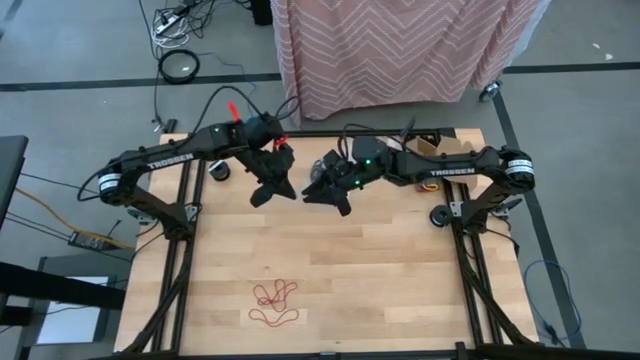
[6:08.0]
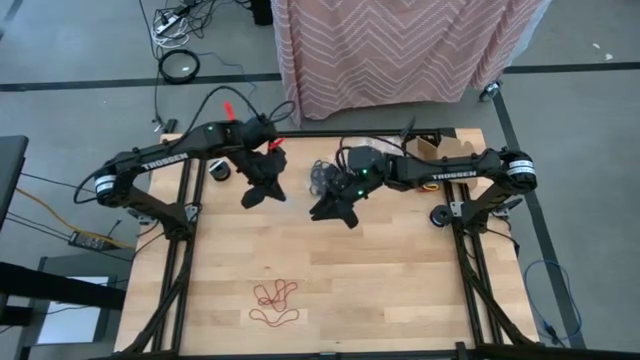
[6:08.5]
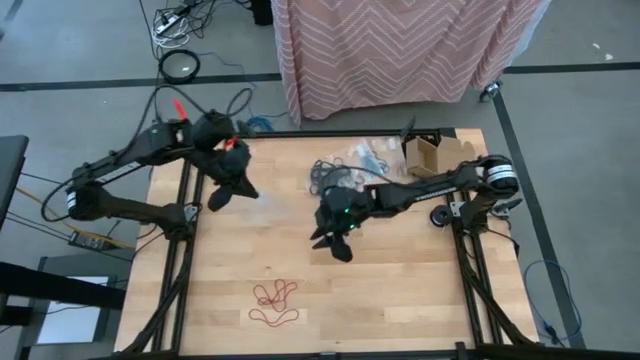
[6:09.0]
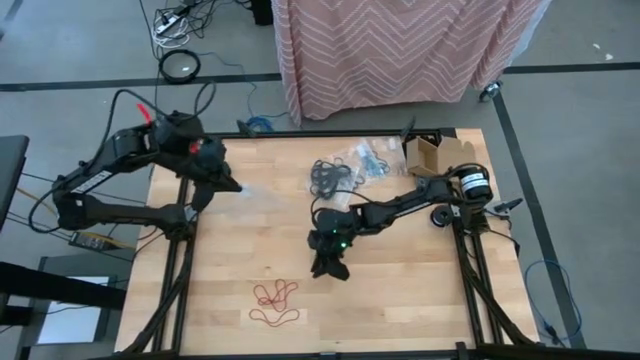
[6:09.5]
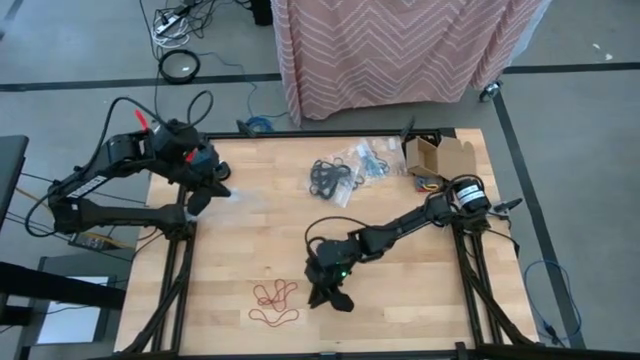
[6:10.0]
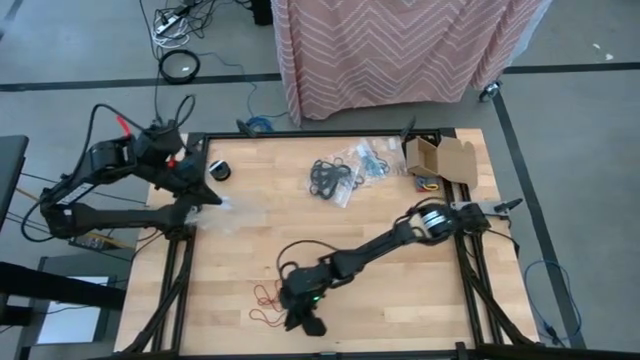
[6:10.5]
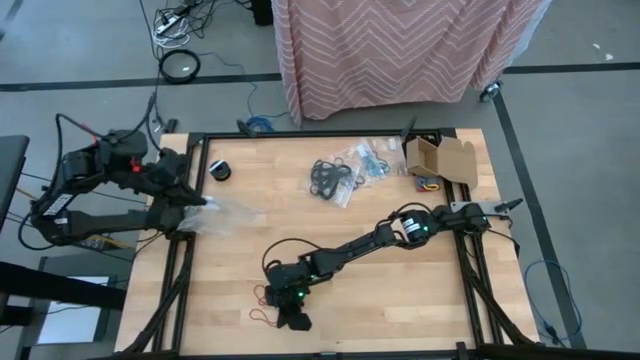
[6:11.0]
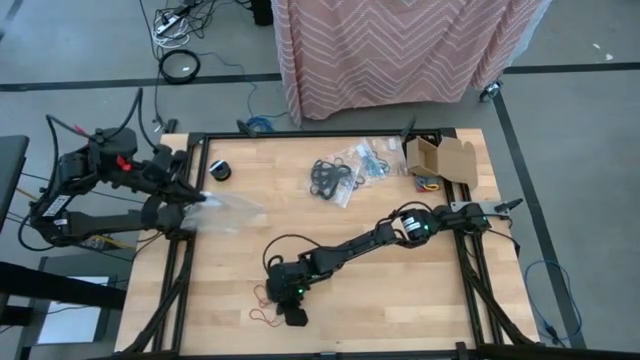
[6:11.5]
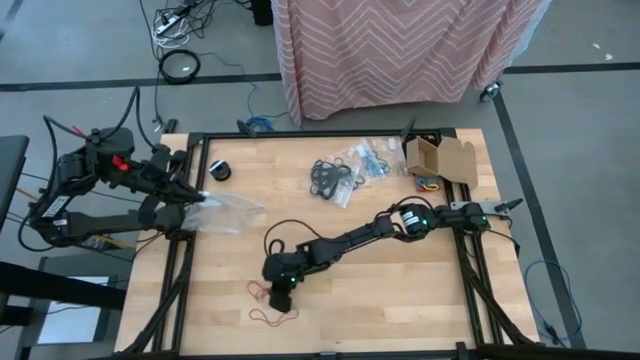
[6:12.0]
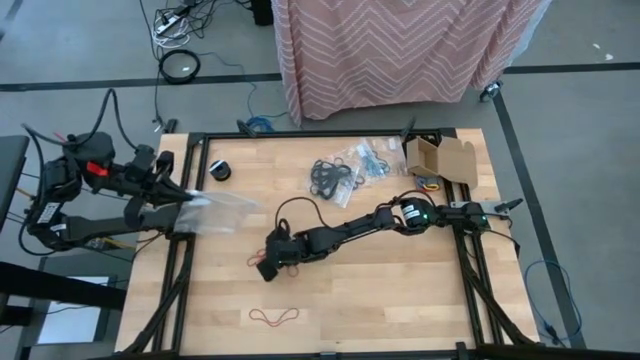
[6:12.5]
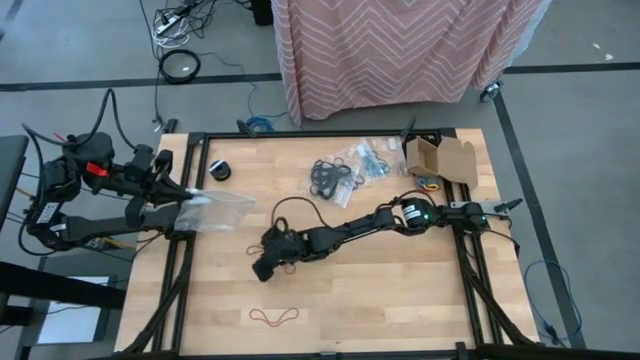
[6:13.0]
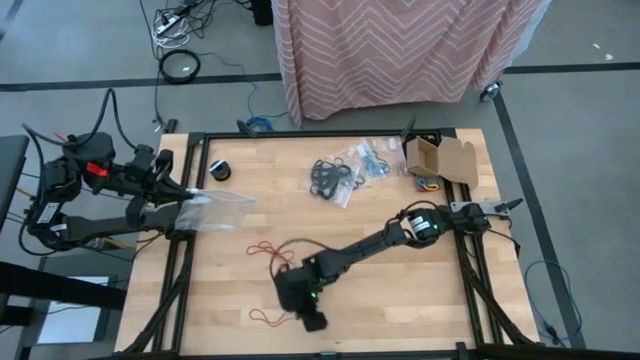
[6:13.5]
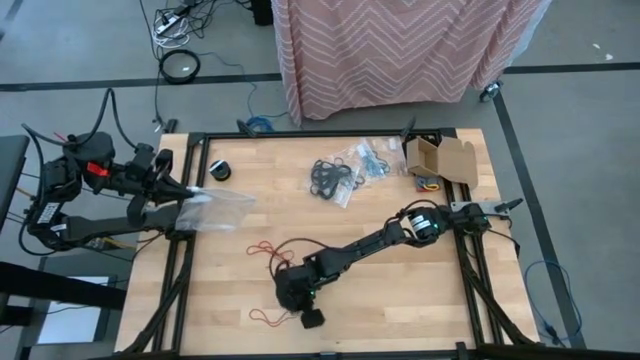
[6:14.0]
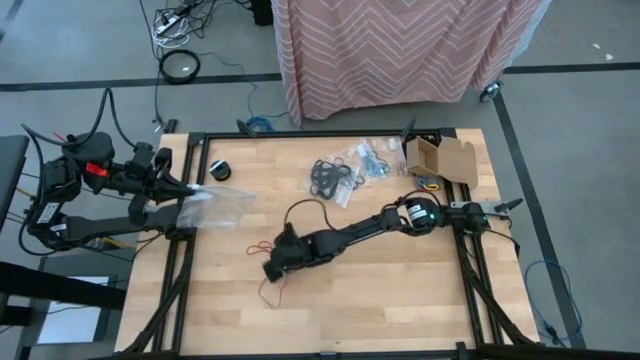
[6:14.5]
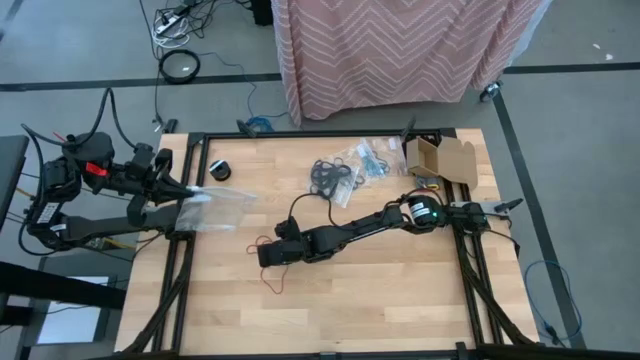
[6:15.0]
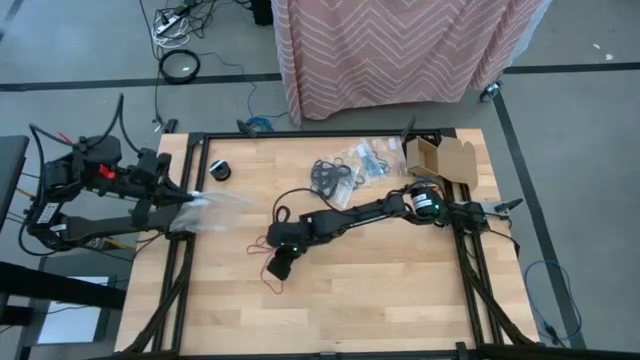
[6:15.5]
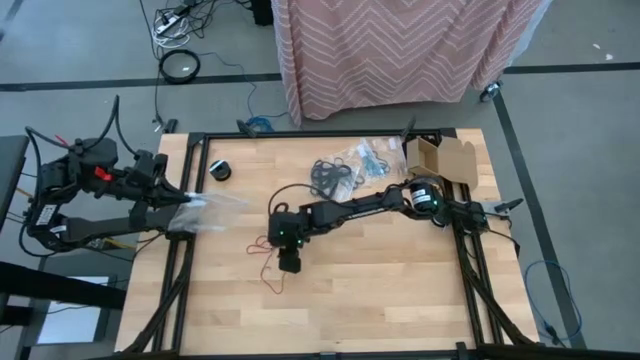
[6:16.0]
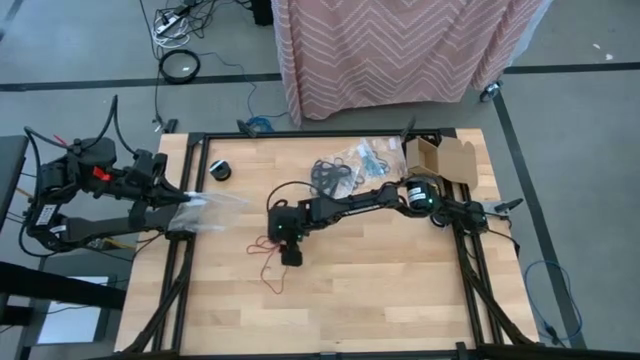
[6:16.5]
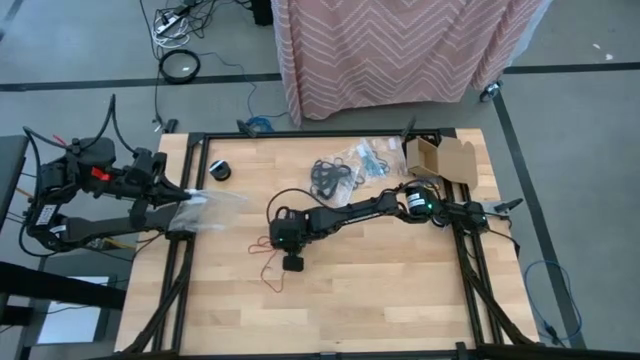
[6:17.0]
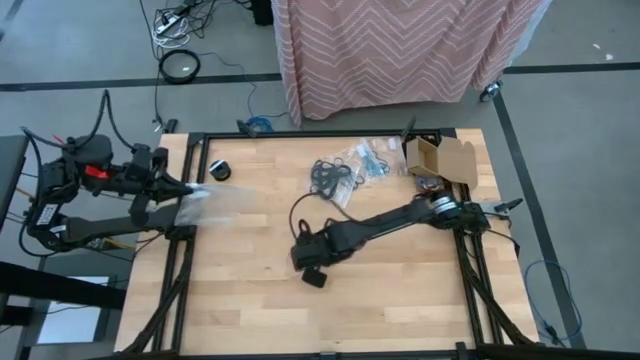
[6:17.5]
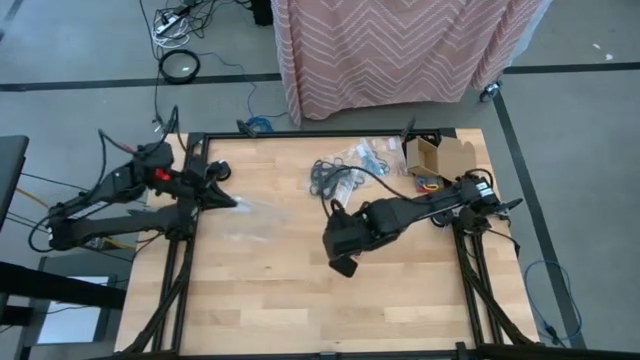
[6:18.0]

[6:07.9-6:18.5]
Task: Sort rubber bands
Prepare the red rubber bands to the center of the table

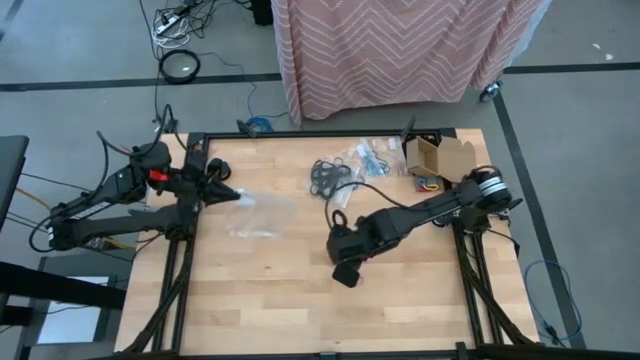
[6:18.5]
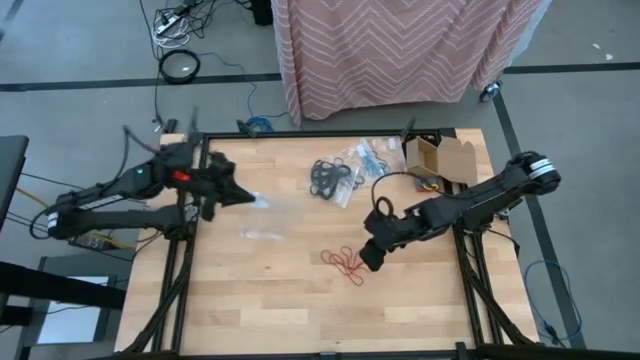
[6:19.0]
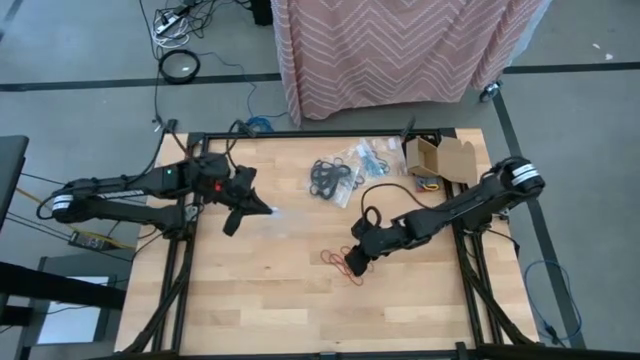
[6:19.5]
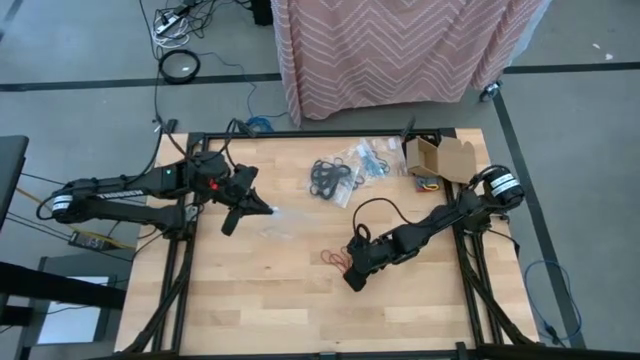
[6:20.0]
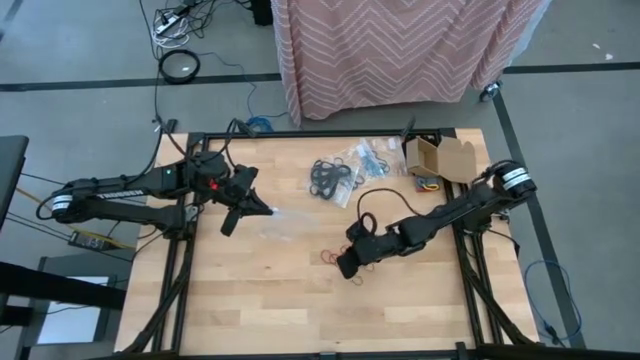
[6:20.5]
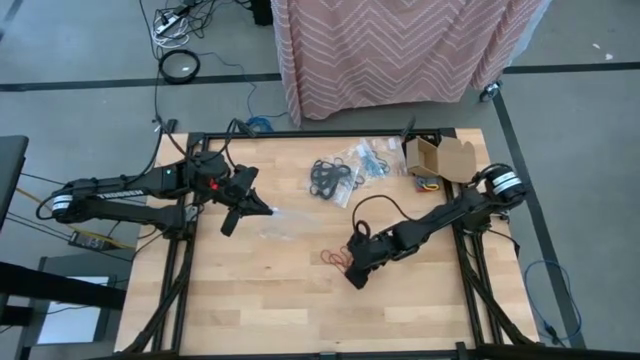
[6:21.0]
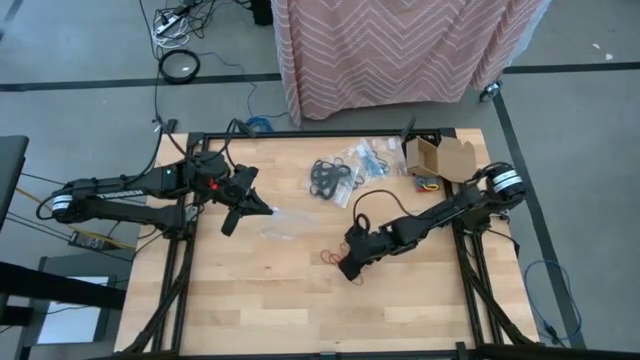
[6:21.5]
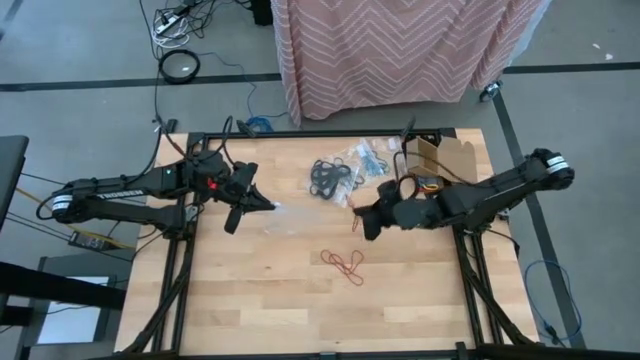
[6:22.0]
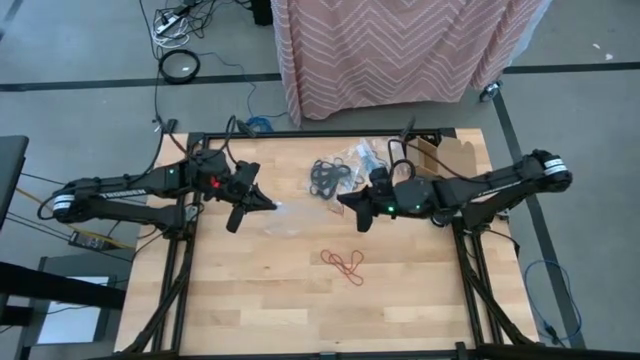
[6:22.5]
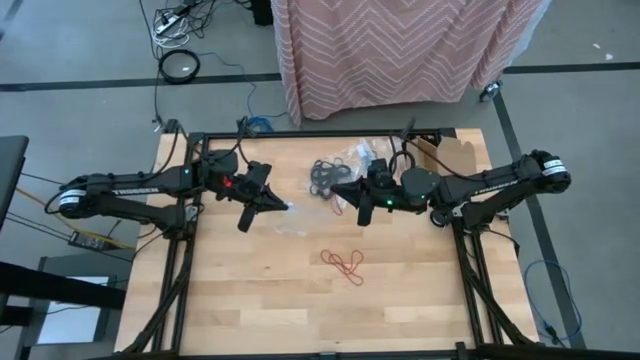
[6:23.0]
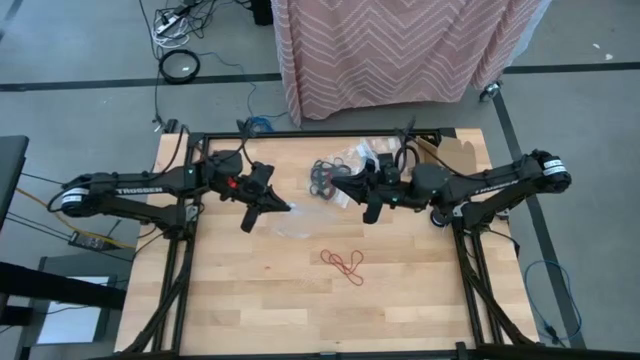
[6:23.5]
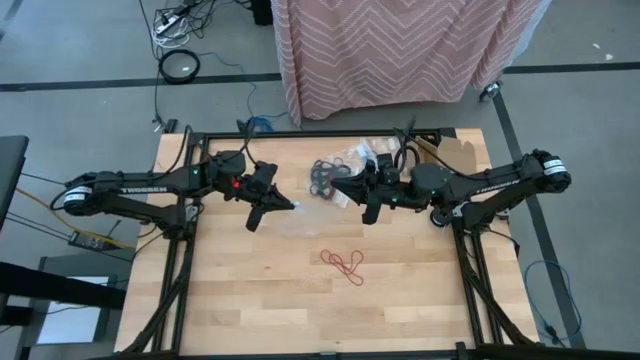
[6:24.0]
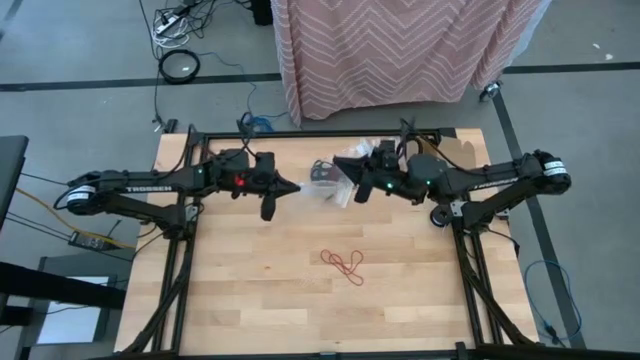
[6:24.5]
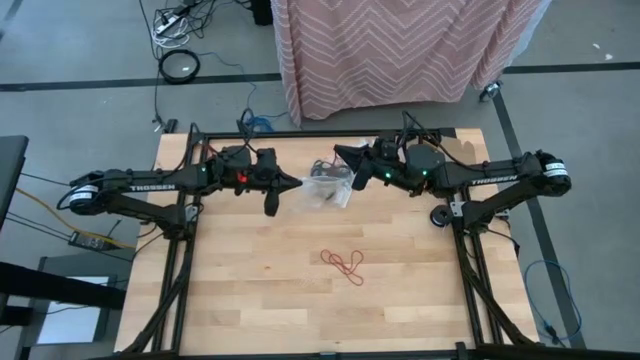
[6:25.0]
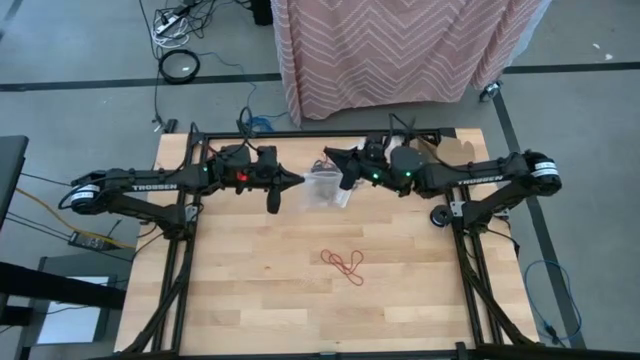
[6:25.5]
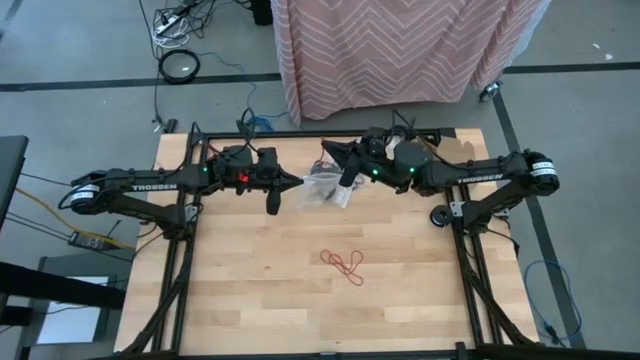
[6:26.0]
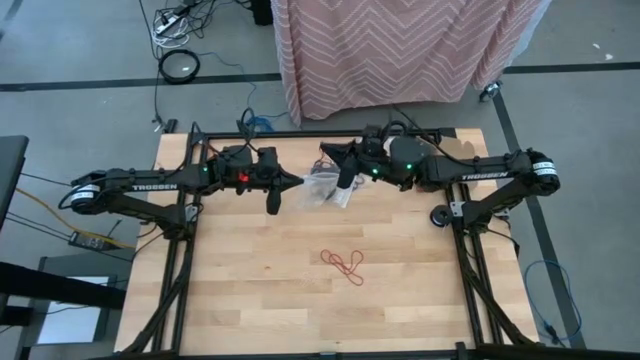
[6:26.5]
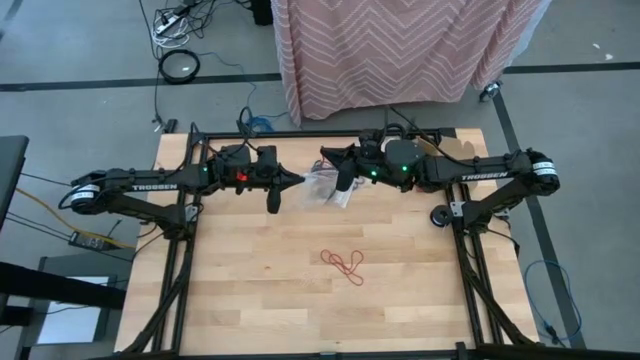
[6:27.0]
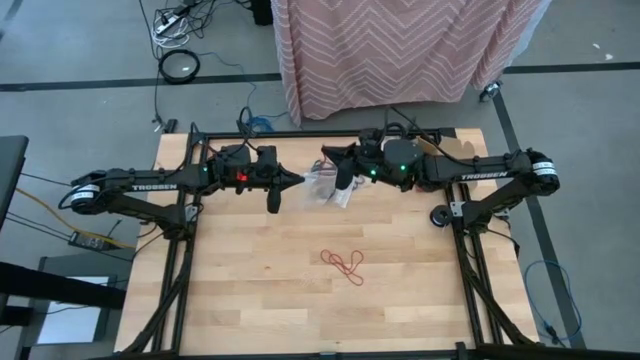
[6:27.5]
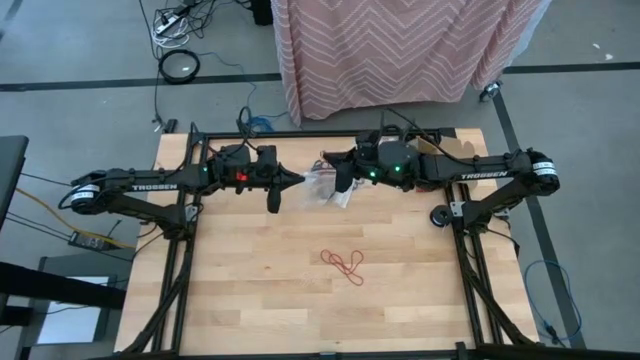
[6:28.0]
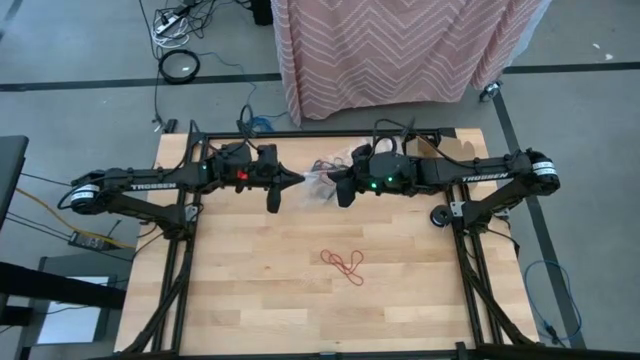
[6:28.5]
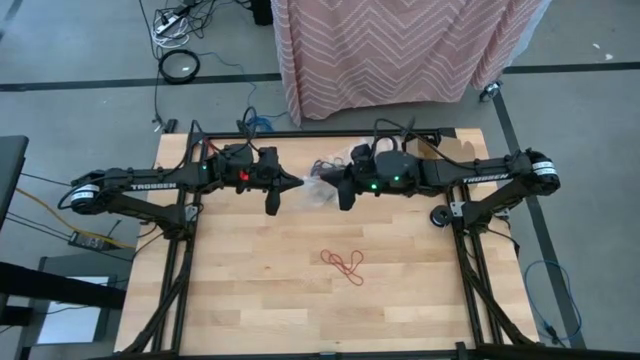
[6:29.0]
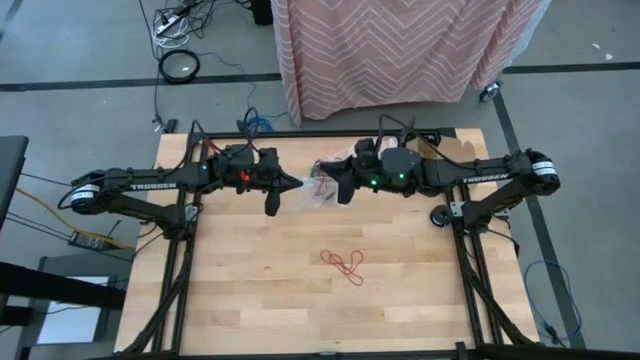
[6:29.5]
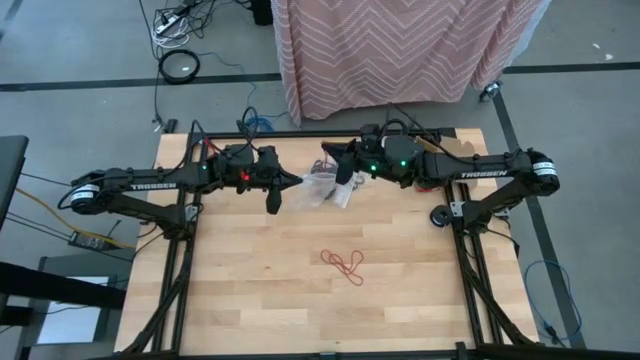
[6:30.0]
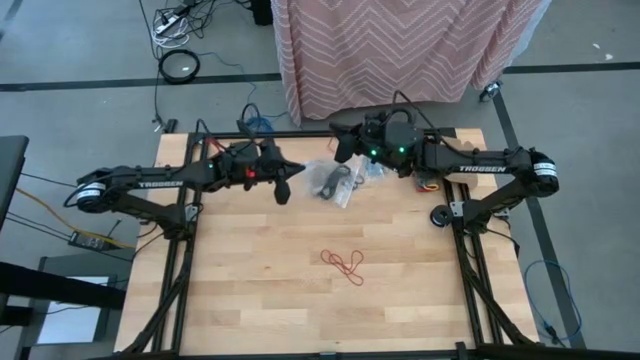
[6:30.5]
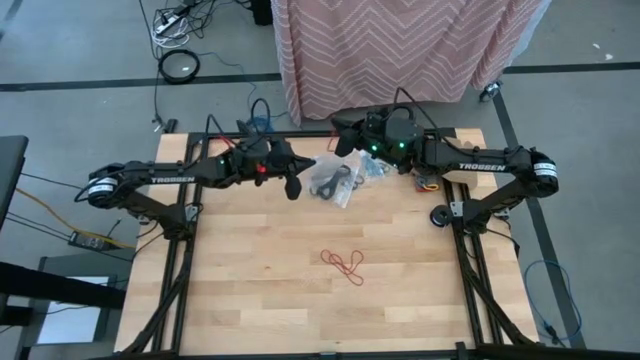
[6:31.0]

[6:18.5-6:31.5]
Put the red rubber band into the transparent zip bag
